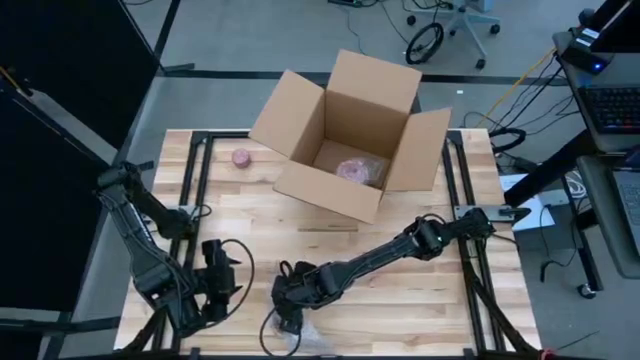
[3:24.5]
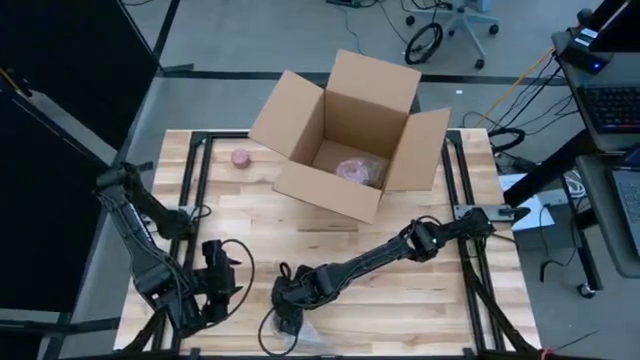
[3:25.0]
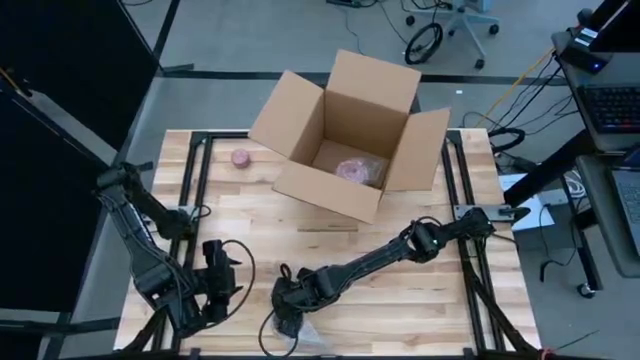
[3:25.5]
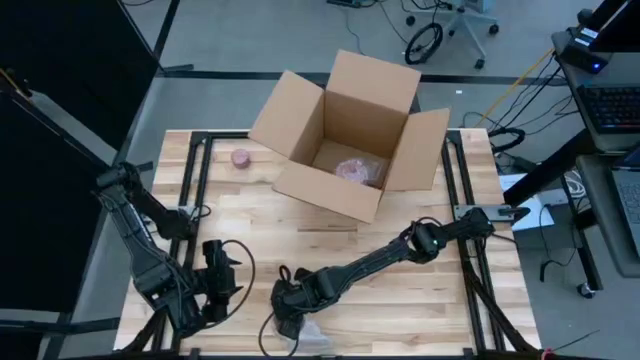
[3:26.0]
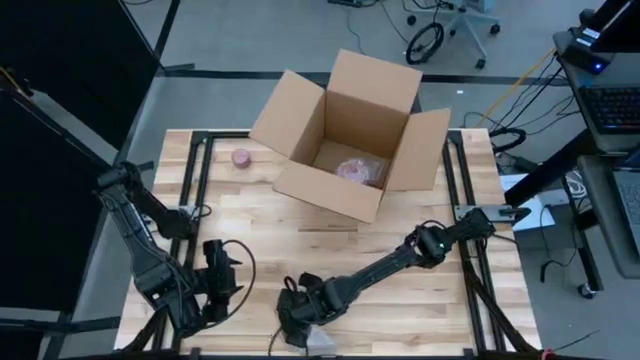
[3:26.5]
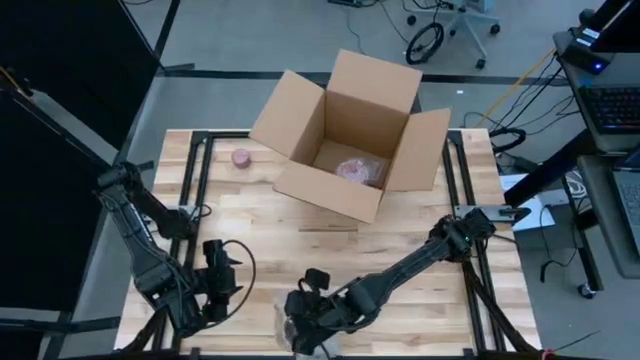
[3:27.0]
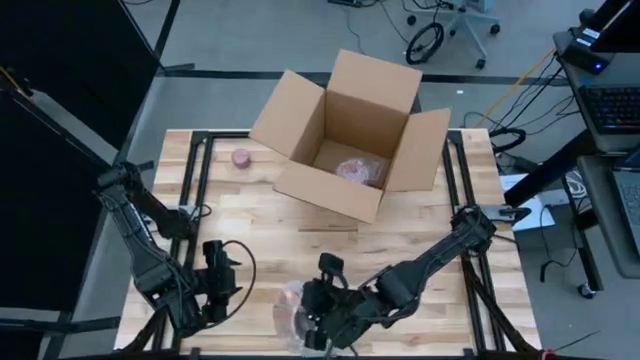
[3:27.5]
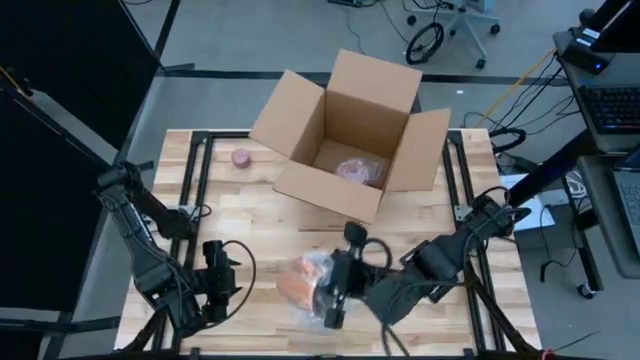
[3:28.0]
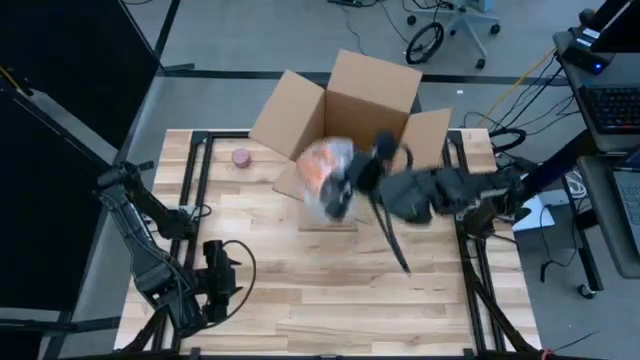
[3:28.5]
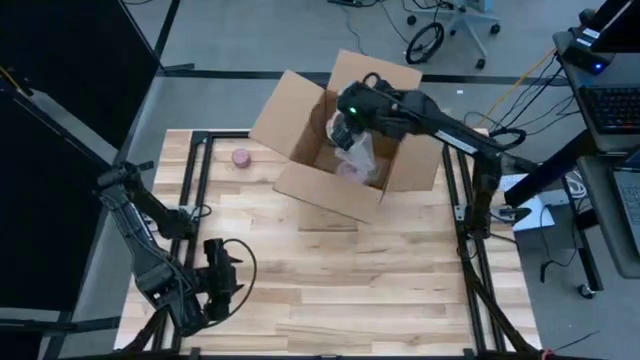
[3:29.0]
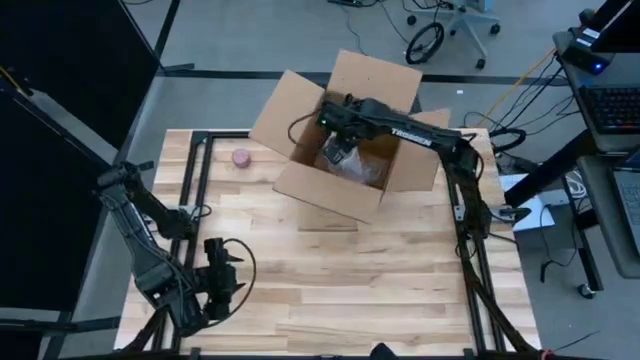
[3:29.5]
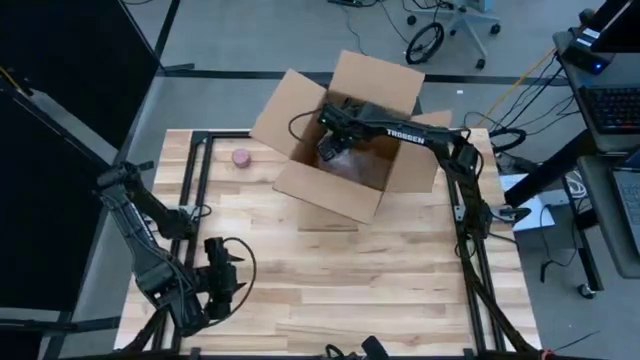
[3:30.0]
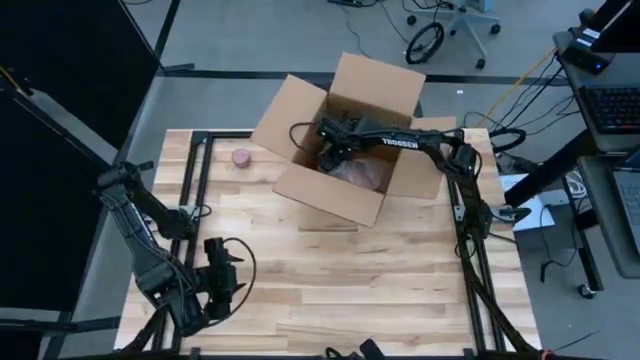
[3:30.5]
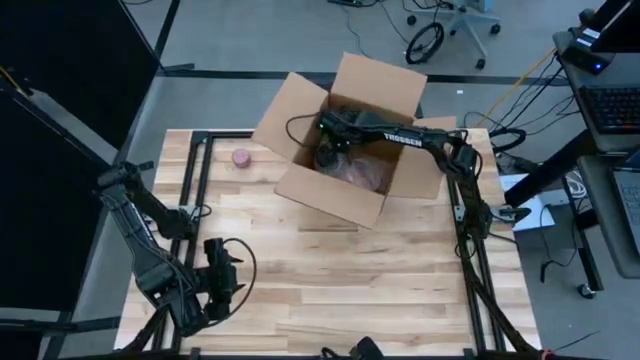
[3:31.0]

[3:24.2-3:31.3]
Task: wrap mug
Put the wrapped yellow cup into the box

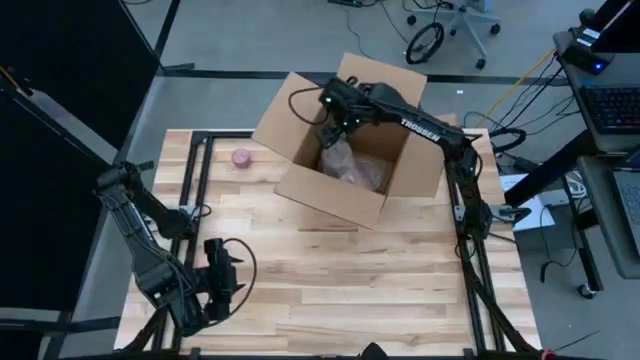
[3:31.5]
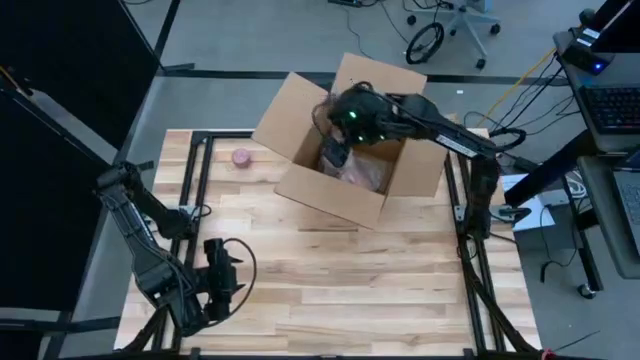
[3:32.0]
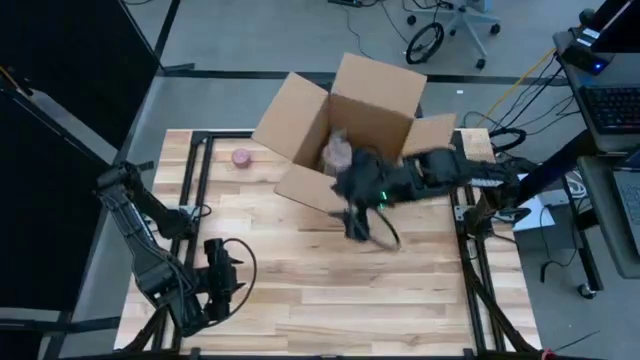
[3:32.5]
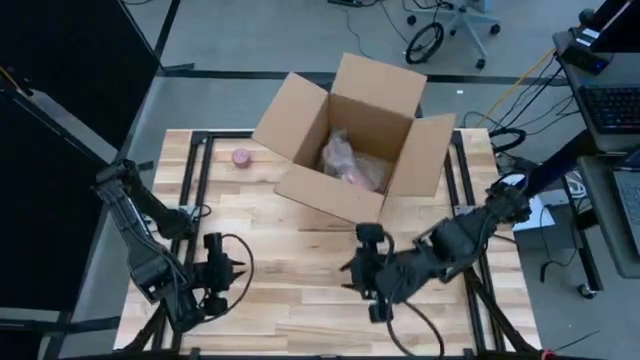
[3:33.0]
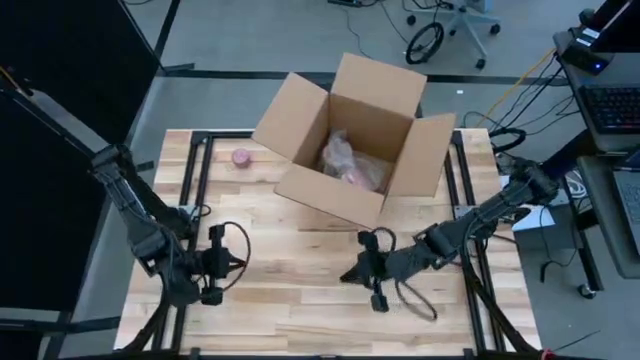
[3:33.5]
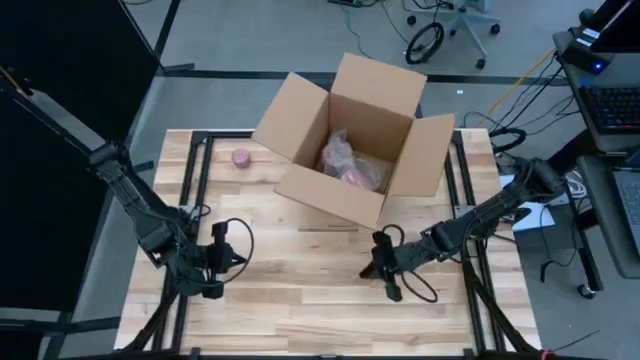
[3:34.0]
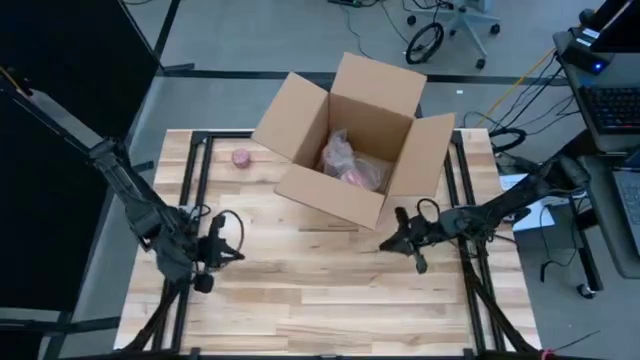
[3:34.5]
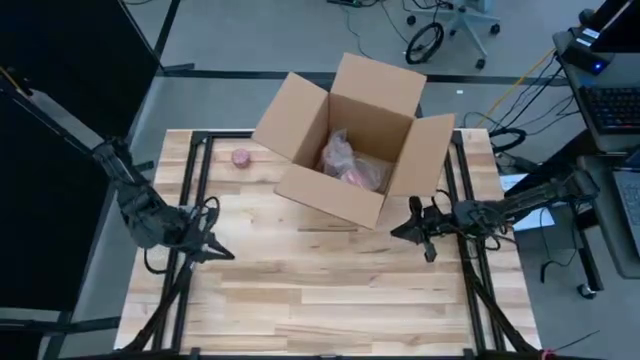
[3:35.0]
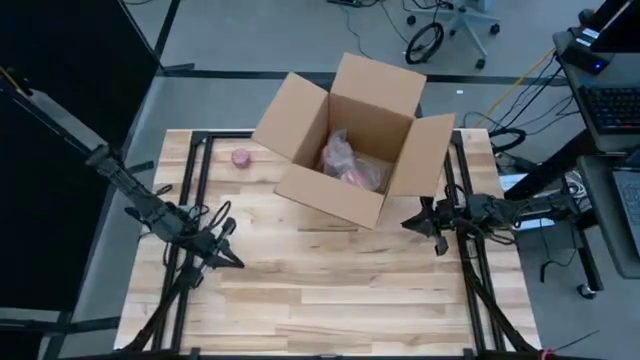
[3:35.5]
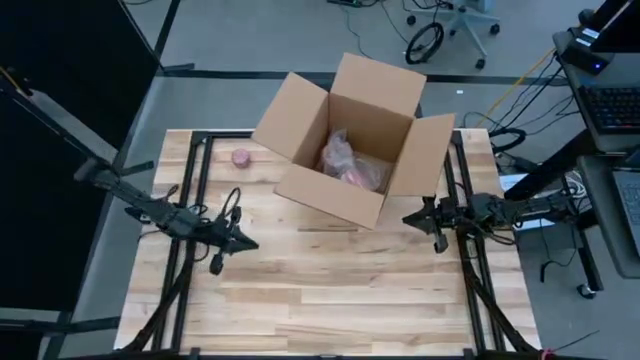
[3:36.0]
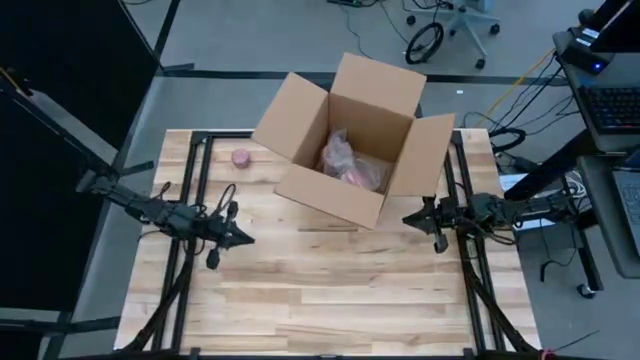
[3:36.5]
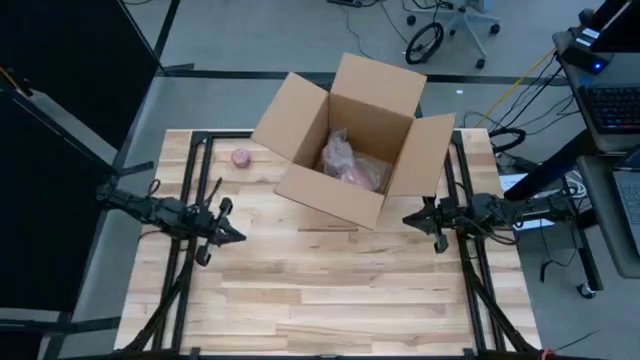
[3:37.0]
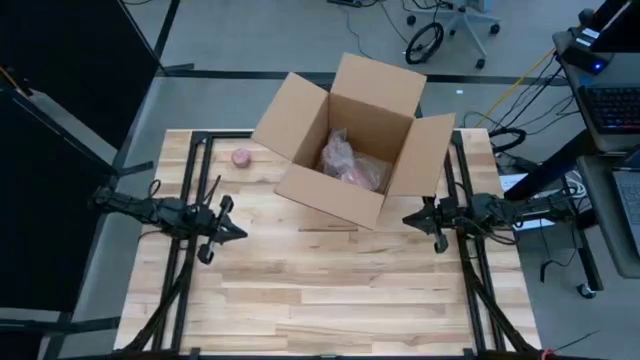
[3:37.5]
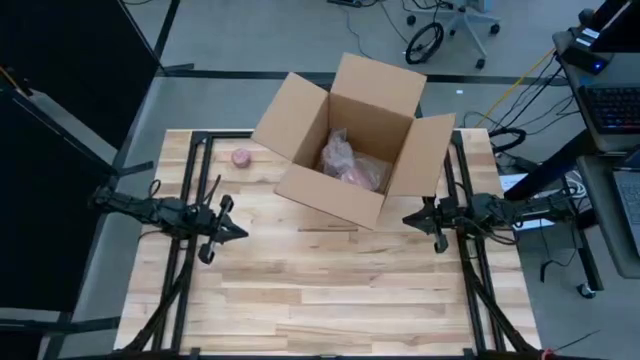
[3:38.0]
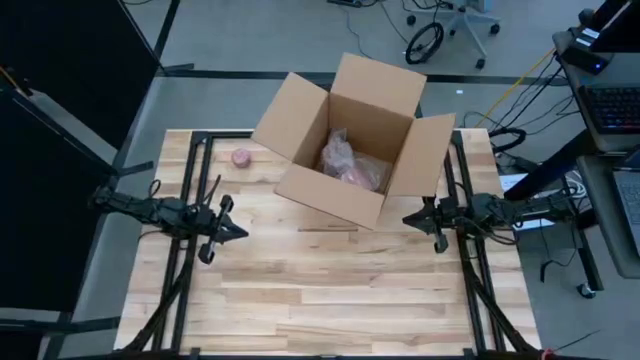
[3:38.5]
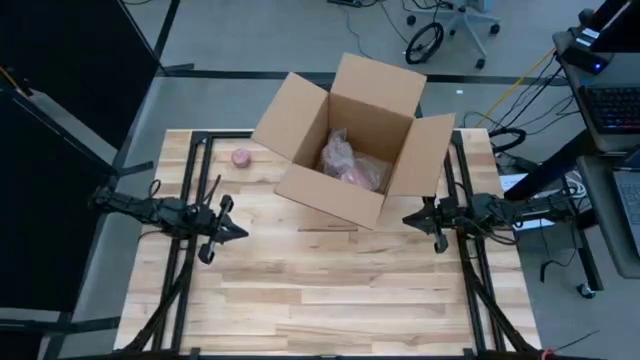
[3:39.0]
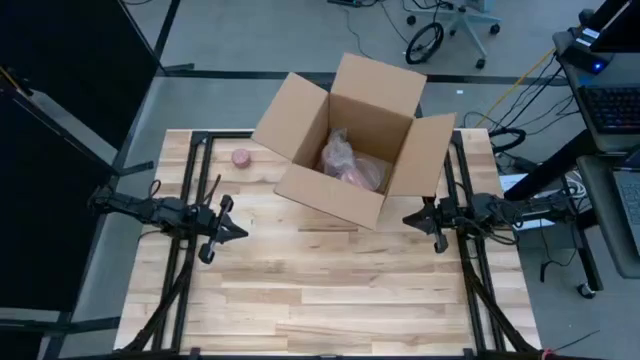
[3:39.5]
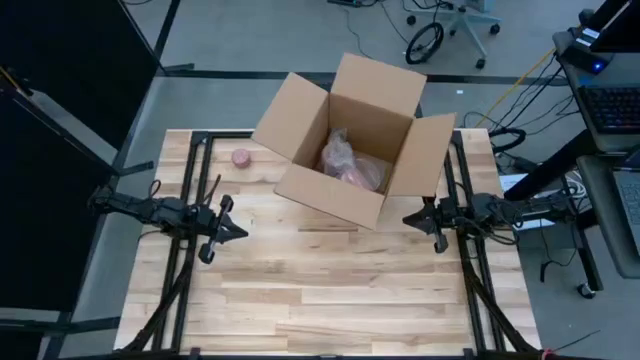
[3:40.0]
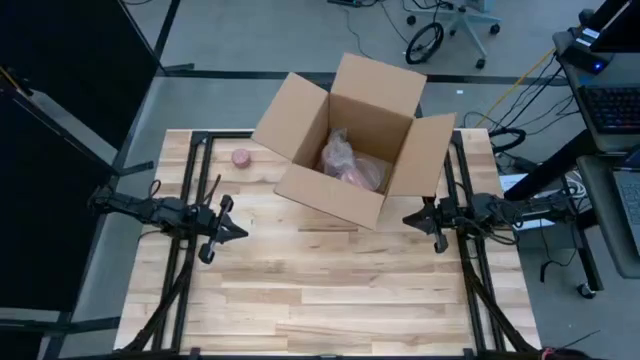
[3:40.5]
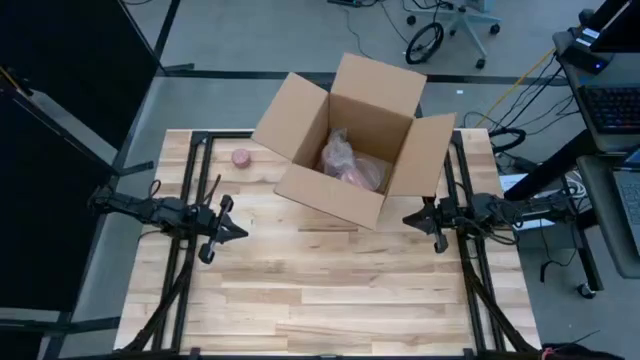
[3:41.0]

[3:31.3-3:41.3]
Return to Home Position

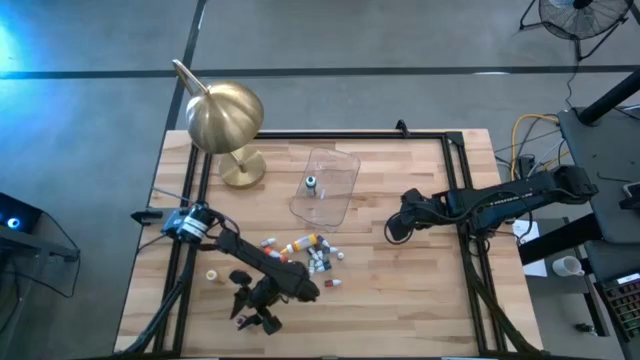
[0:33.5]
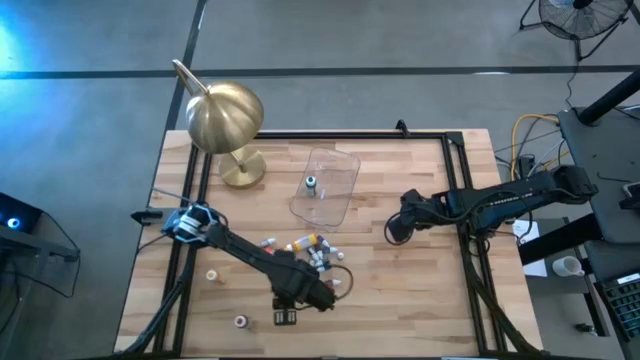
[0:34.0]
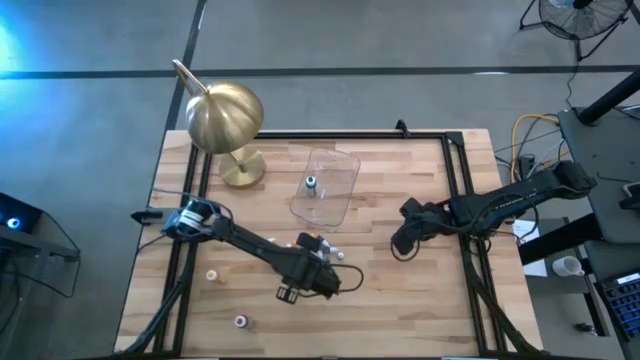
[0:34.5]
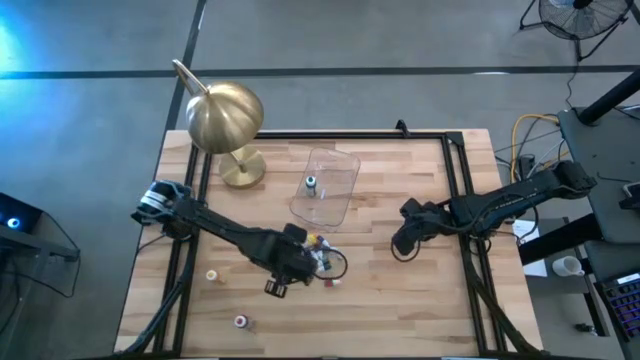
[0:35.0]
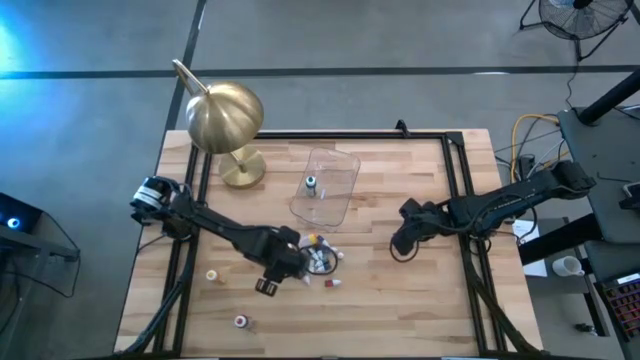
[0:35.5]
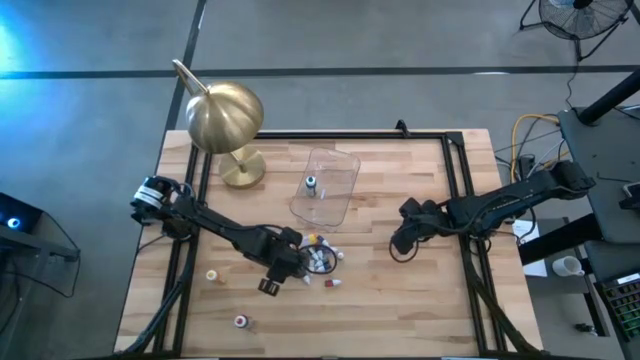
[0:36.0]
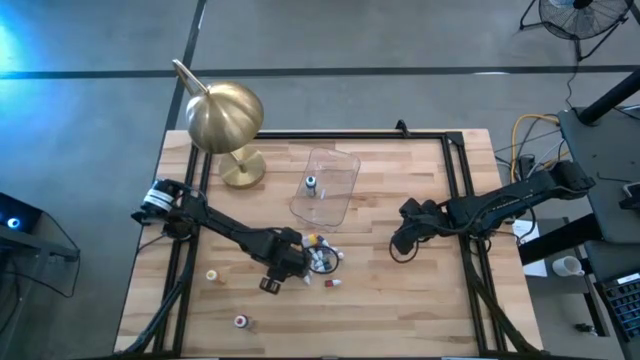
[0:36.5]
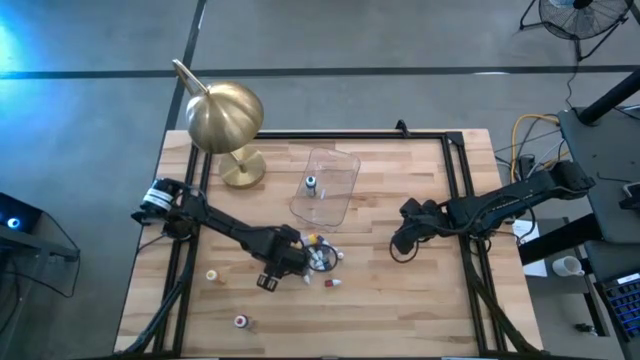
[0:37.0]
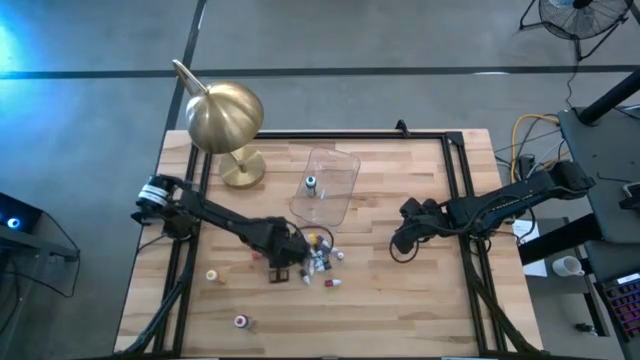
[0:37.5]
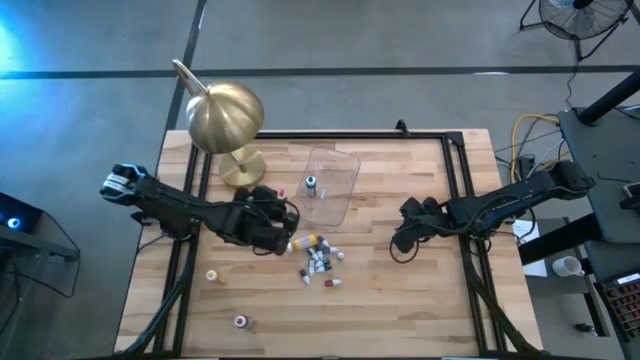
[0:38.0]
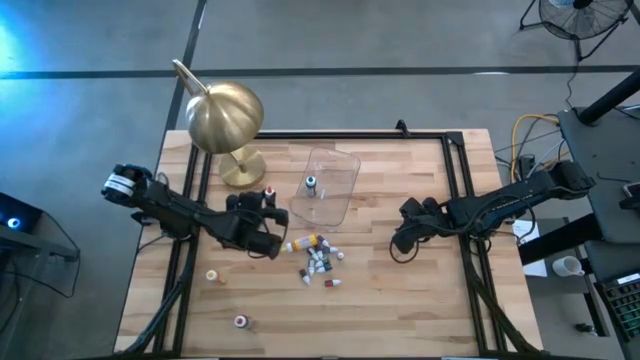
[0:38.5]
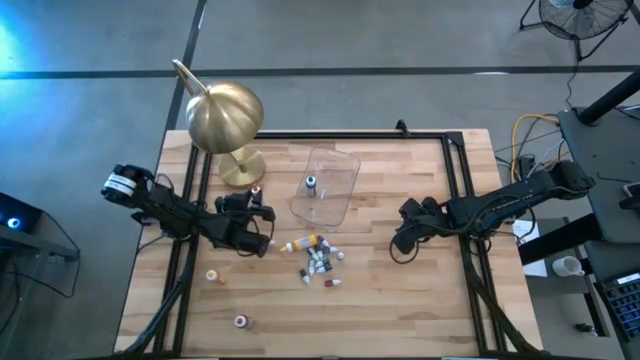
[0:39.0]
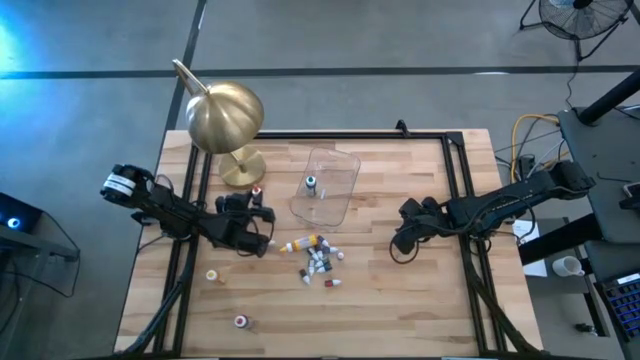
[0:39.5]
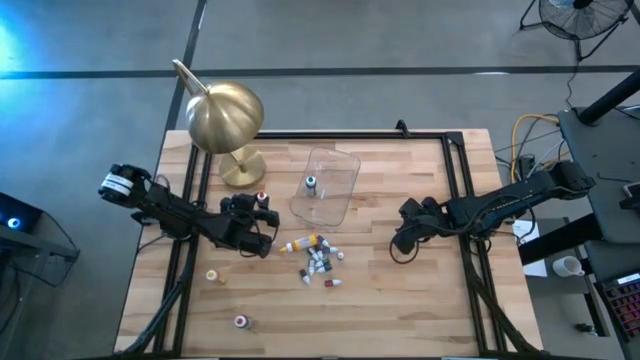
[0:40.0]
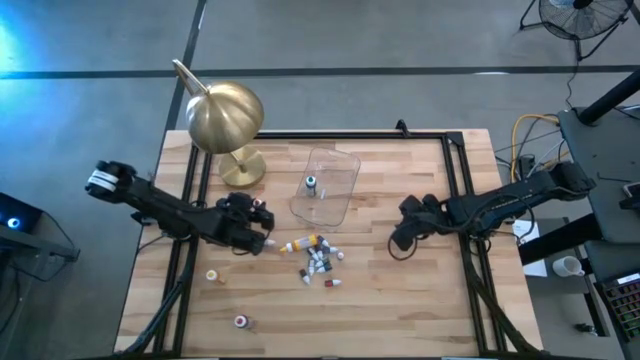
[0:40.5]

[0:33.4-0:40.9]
Task: Pick & Place food coloring
Move the large orange food coloring bottle to the middle left of the table
